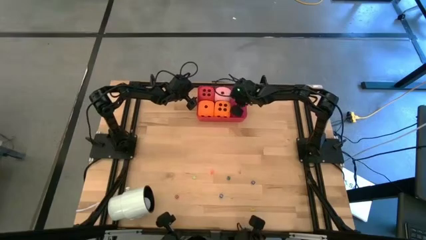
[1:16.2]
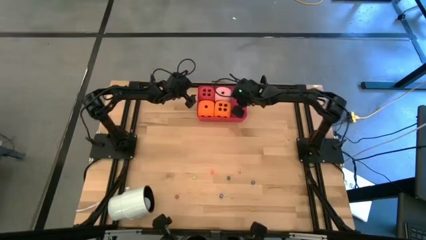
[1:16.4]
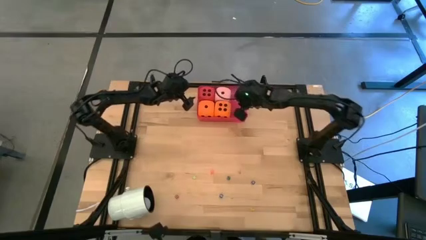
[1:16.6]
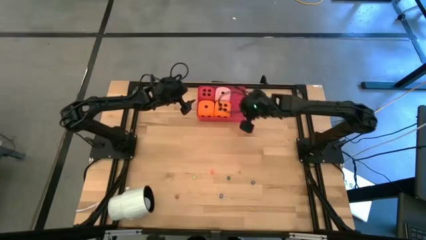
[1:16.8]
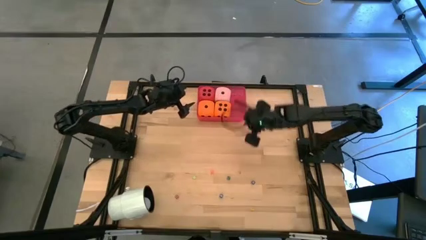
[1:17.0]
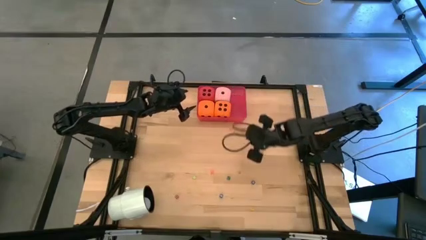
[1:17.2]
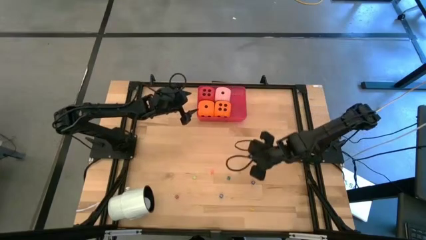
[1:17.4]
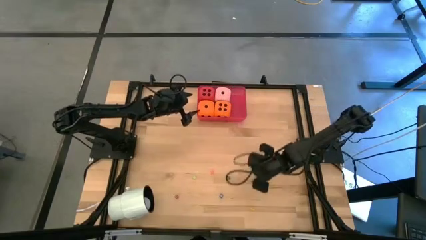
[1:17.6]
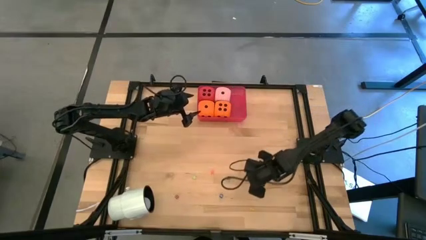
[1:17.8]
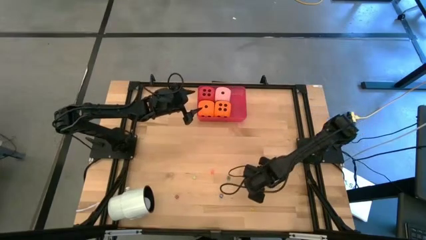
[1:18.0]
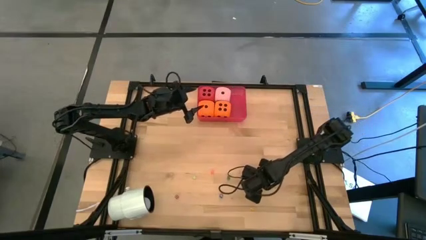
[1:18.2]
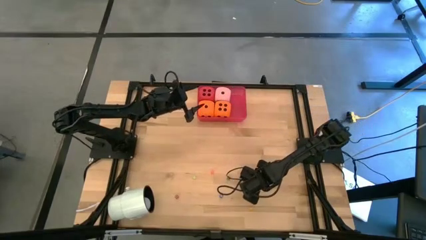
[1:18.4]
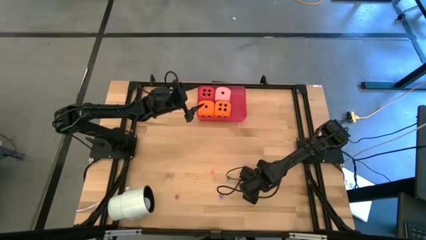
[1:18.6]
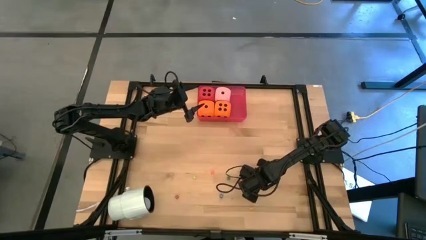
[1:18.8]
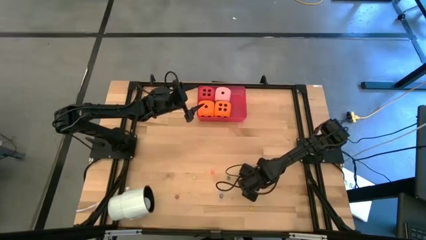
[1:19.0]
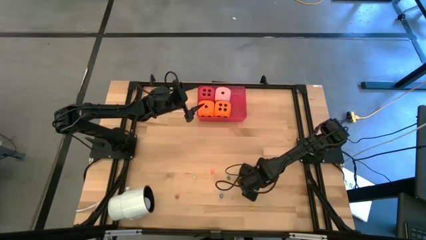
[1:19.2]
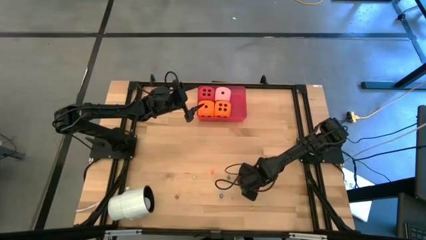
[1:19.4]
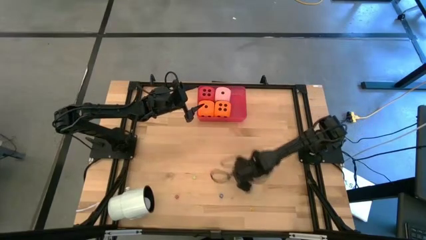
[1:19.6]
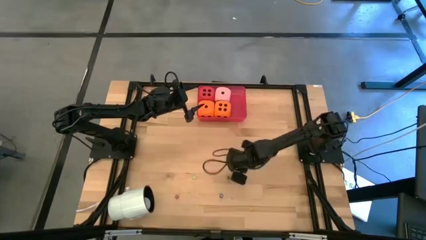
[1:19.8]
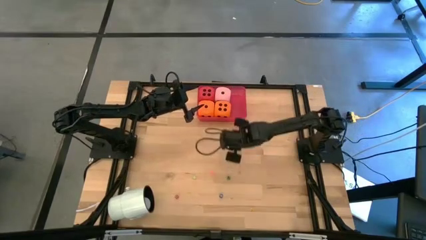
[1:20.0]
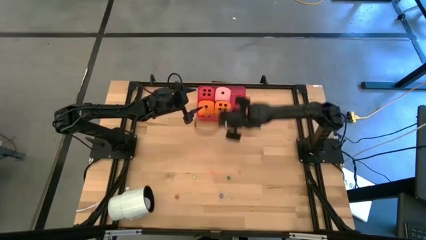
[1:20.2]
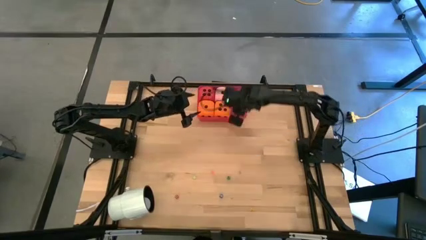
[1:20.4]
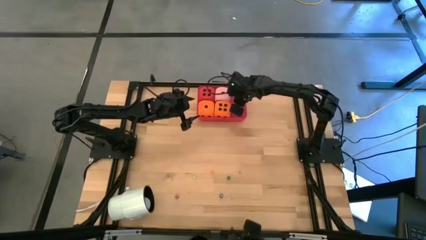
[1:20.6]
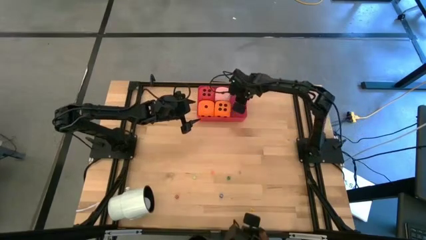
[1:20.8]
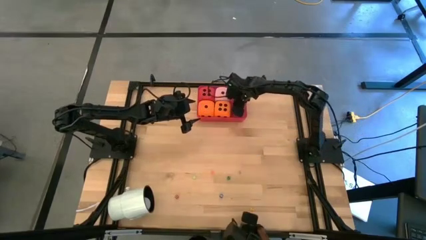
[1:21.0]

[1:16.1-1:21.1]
Task: Pick & Place Dice
Put the right small blue dice into the red container

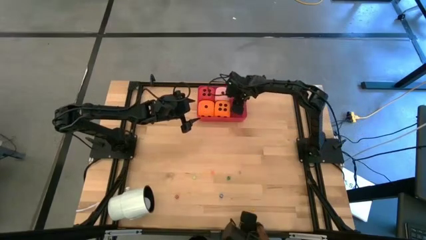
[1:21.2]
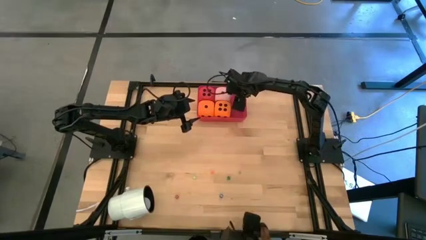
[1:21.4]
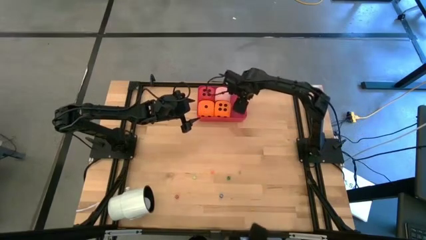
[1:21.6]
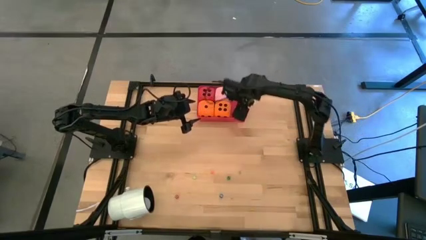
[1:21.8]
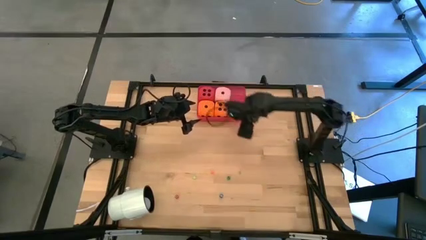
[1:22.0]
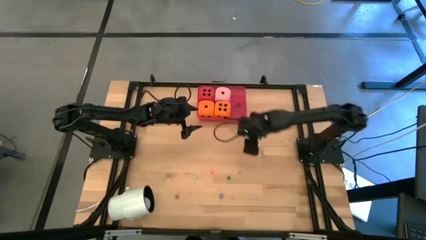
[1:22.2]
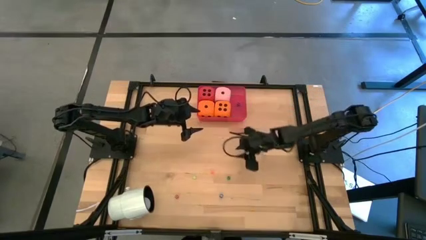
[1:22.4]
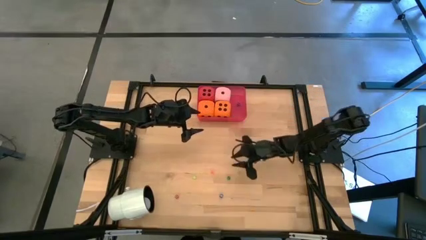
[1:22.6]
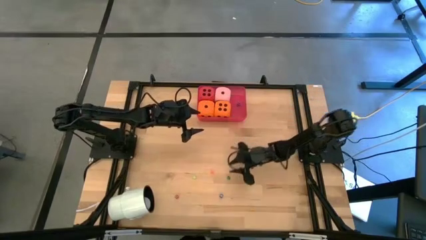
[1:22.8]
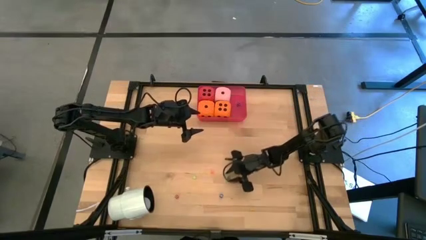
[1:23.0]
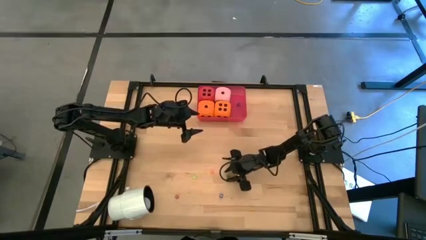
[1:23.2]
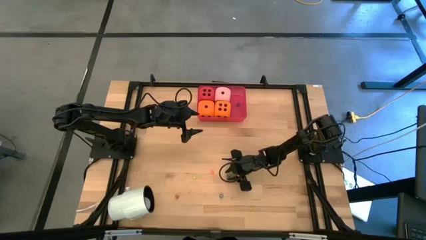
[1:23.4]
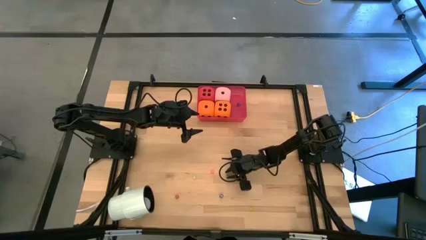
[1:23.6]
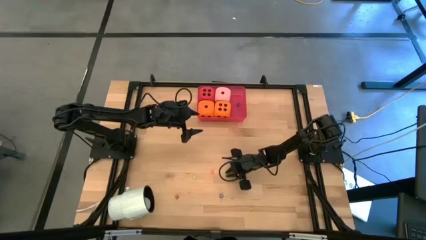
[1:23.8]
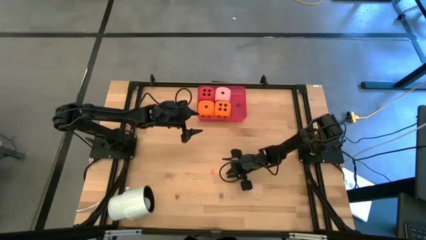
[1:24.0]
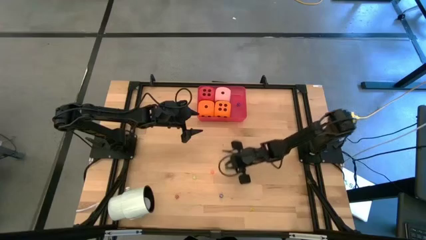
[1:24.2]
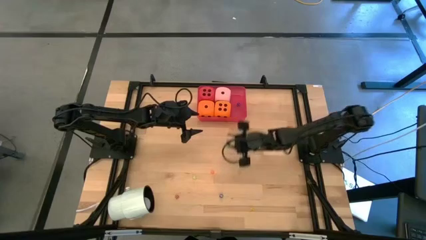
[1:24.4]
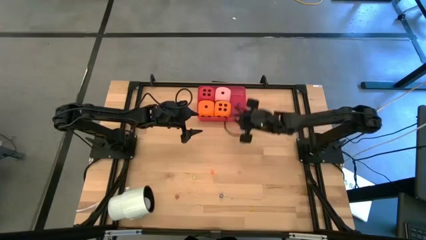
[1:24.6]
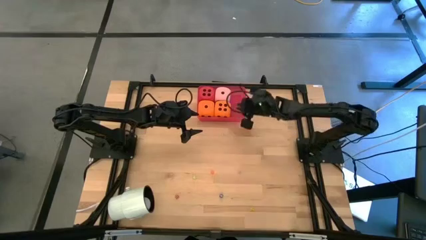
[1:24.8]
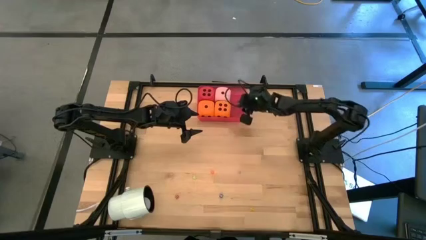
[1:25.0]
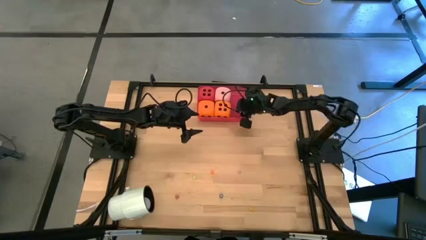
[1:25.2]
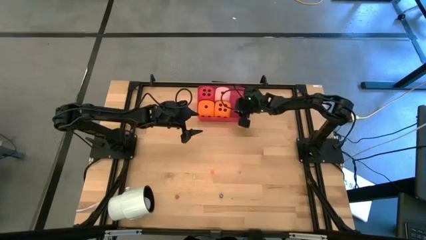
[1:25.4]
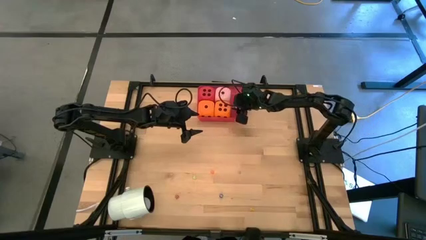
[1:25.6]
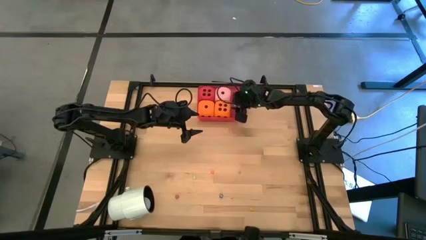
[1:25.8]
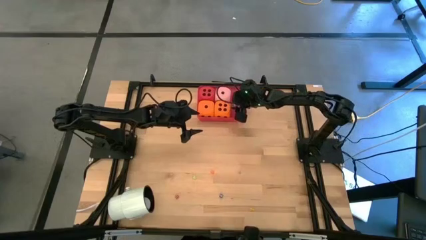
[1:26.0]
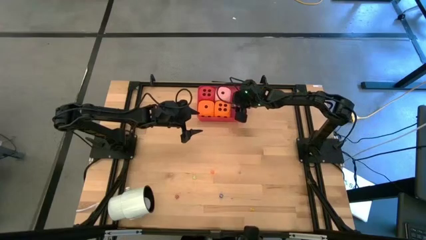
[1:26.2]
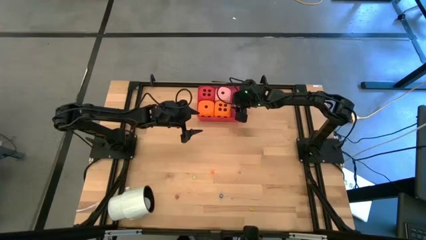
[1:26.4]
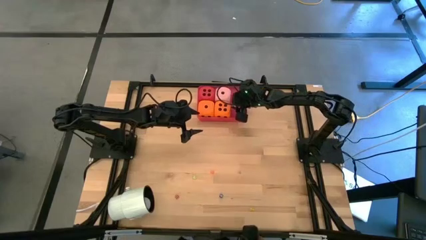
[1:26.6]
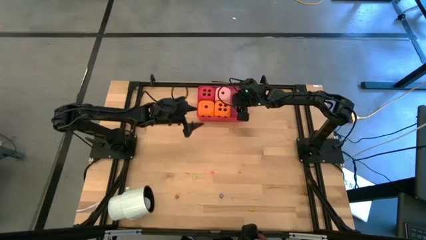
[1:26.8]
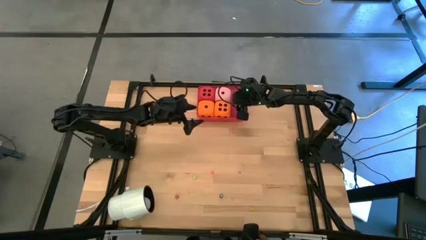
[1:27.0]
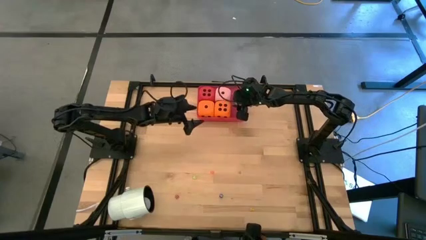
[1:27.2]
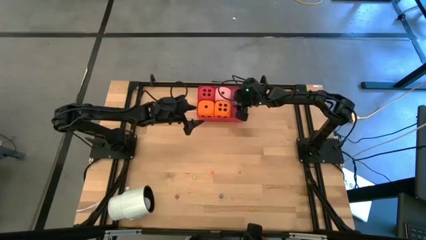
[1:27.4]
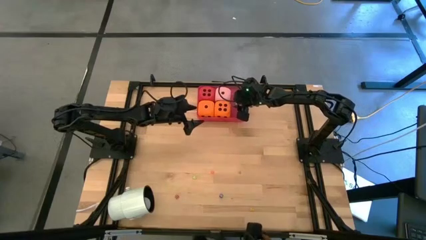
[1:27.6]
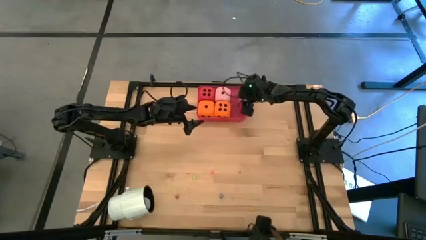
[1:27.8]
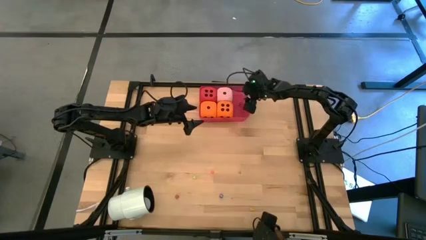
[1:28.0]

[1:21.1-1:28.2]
Put the small dark green dice into the red container

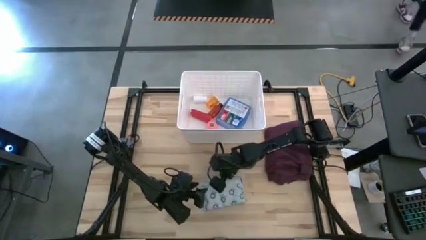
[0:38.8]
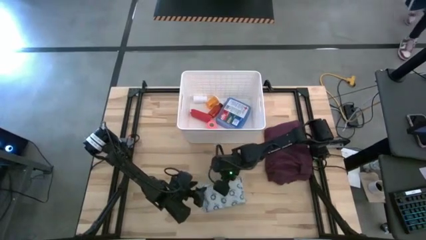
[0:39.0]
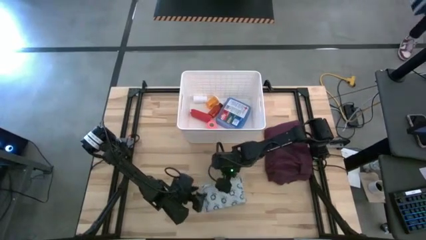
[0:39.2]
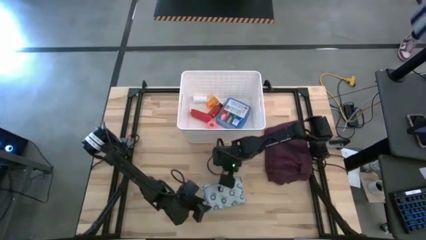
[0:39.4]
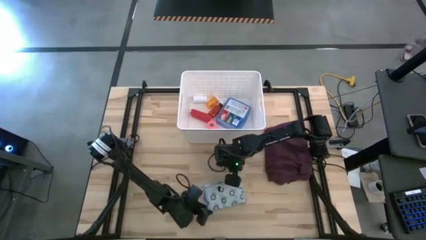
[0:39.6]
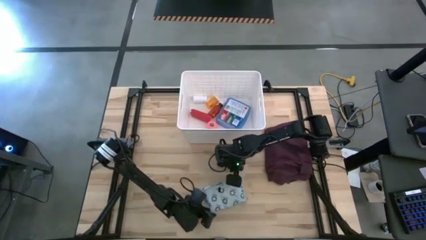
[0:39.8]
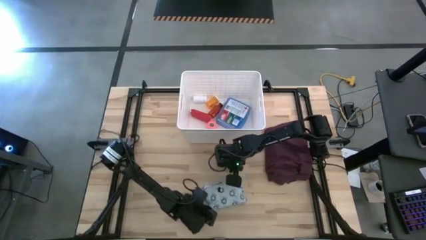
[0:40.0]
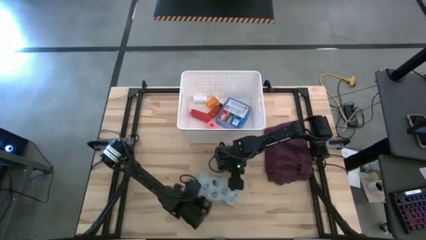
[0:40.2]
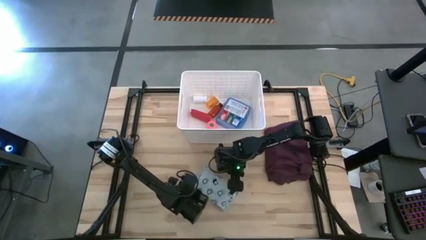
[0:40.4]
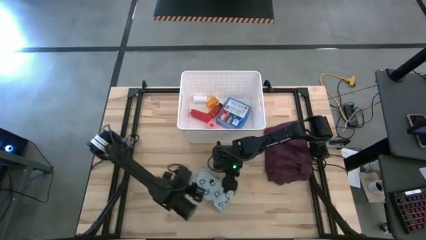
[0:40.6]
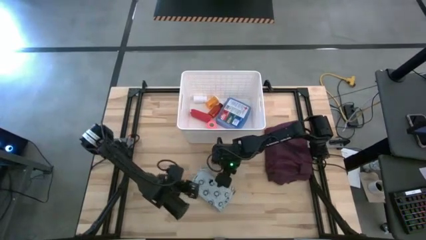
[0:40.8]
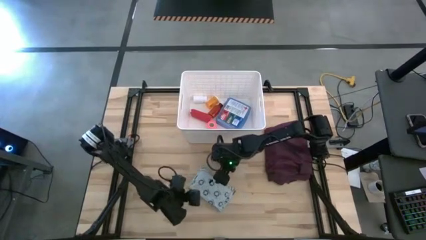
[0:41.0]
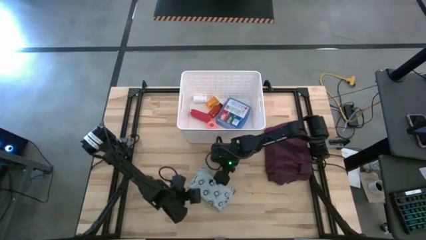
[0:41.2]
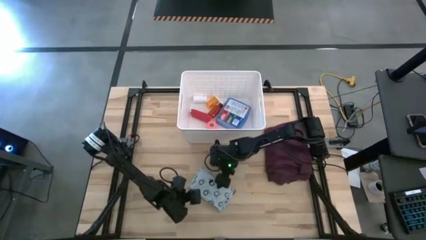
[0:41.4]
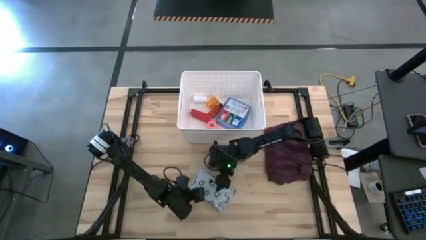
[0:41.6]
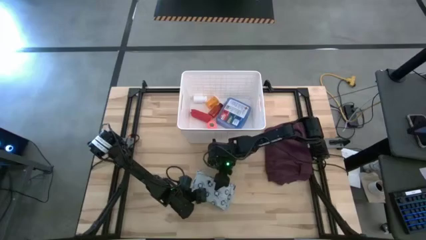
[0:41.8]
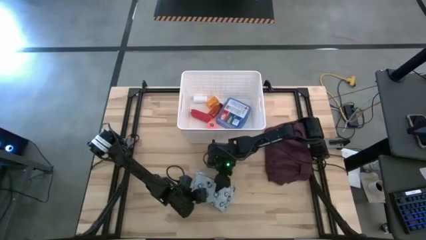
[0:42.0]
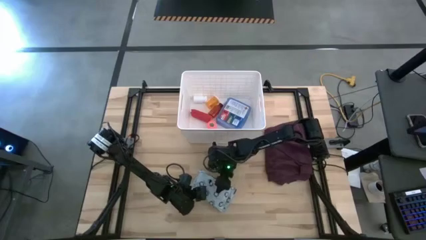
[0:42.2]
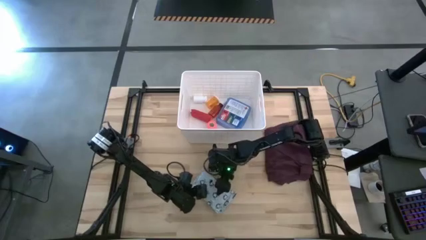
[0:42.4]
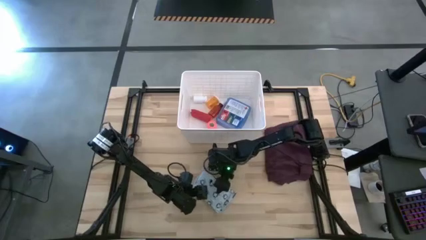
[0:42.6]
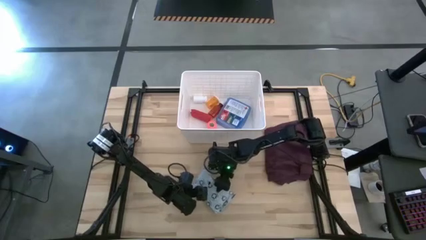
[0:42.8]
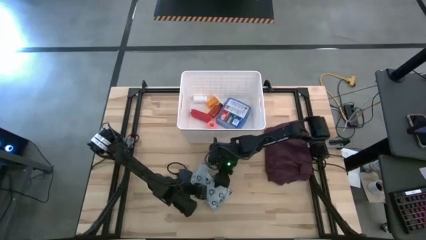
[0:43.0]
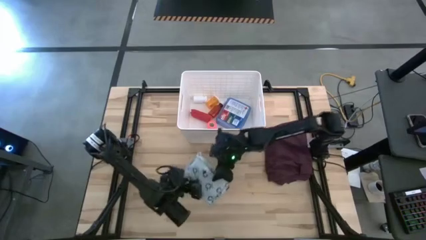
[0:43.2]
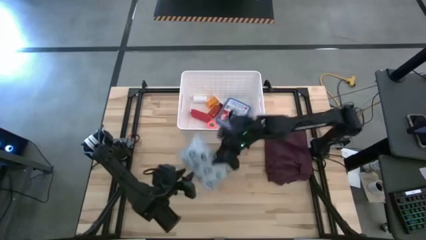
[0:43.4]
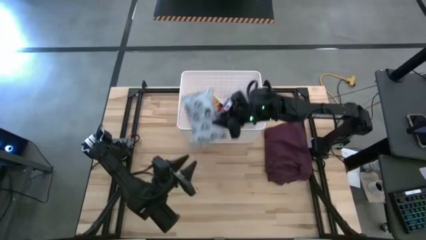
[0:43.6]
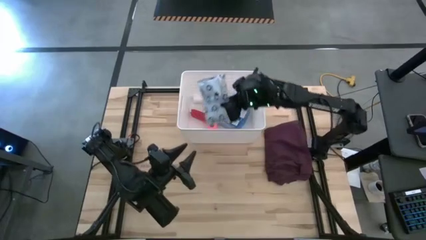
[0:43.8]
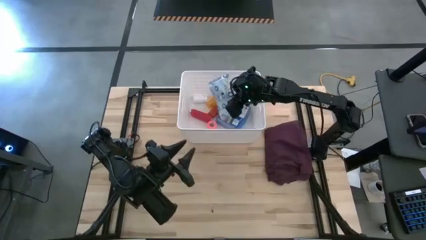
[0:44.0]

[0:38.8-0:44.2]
Task: Pick & place medical supplies in basket/bin
Put the mailer bag into the white bin
